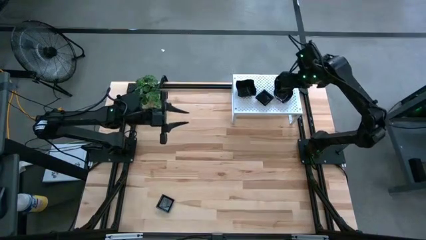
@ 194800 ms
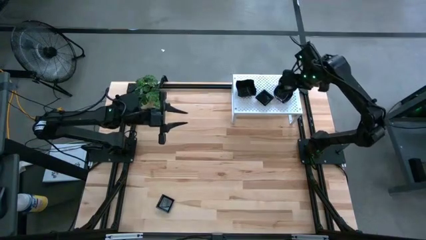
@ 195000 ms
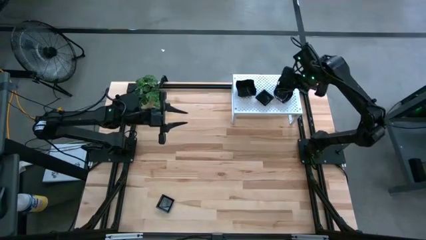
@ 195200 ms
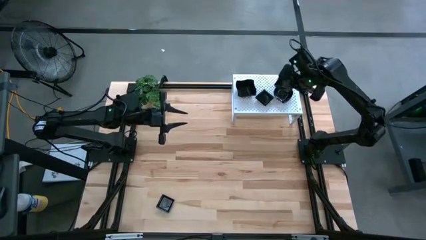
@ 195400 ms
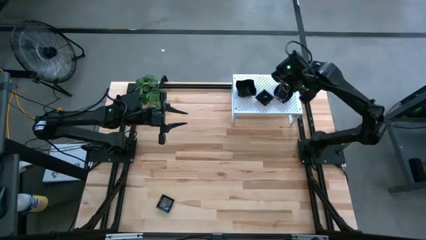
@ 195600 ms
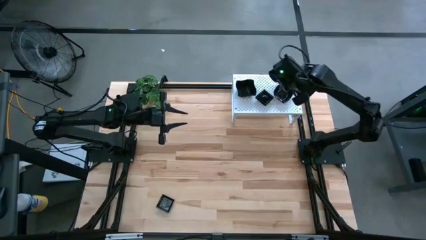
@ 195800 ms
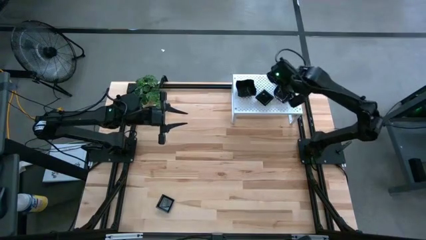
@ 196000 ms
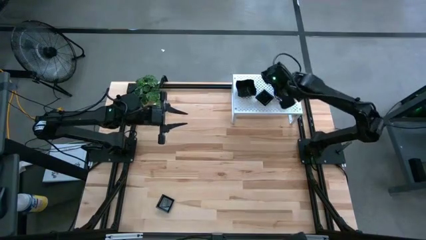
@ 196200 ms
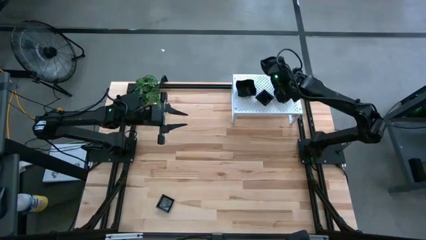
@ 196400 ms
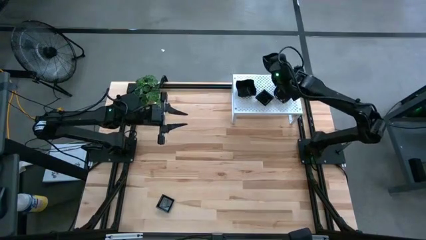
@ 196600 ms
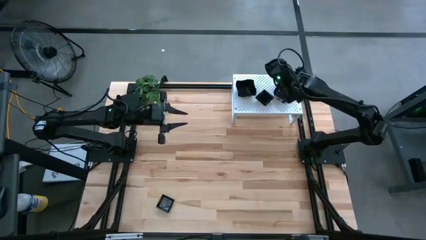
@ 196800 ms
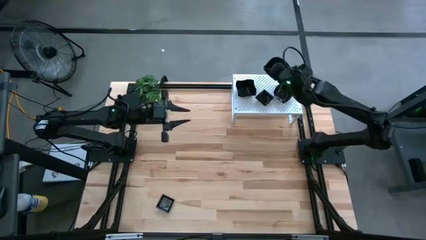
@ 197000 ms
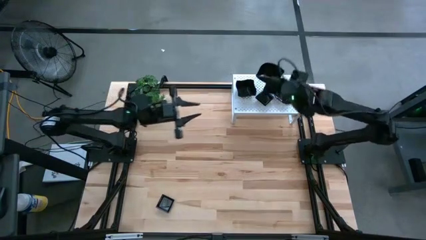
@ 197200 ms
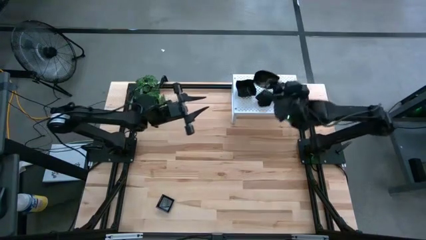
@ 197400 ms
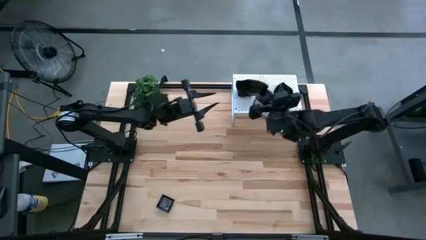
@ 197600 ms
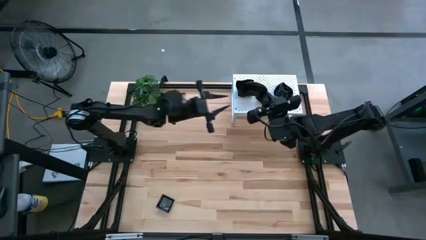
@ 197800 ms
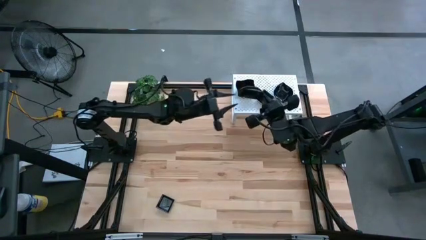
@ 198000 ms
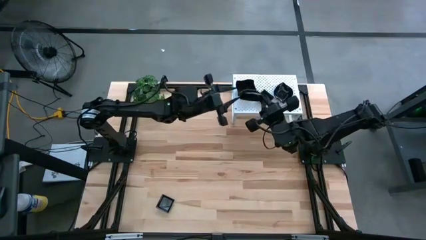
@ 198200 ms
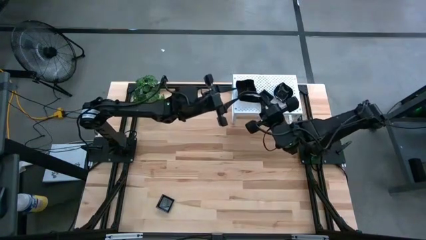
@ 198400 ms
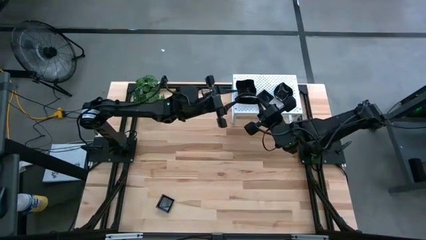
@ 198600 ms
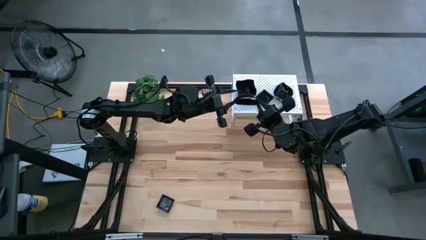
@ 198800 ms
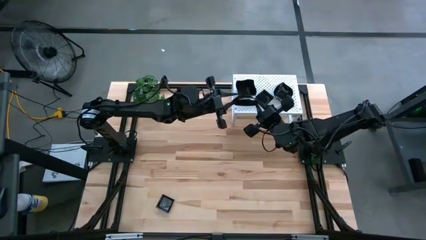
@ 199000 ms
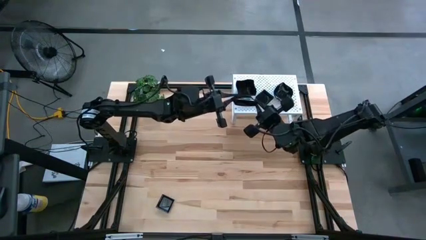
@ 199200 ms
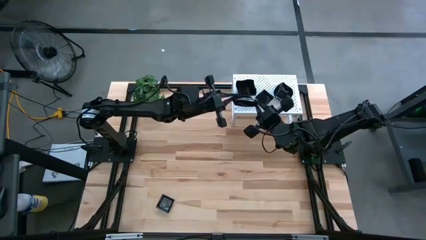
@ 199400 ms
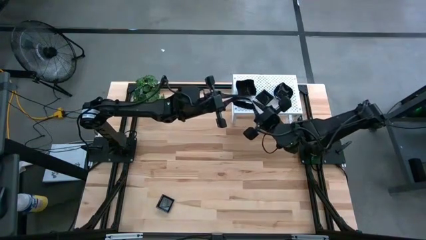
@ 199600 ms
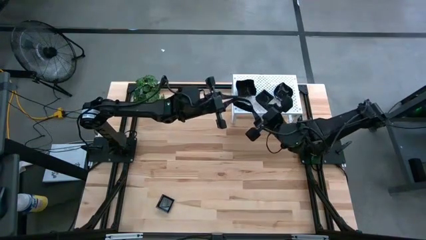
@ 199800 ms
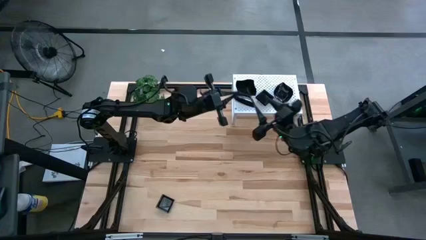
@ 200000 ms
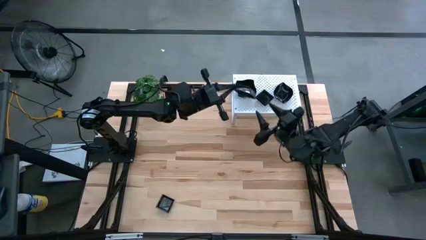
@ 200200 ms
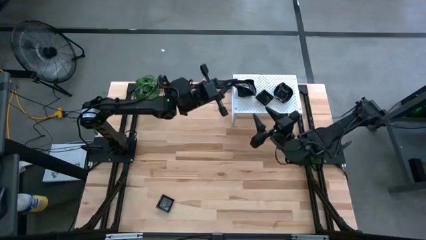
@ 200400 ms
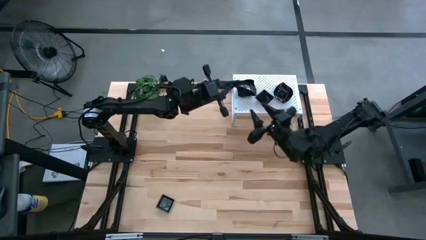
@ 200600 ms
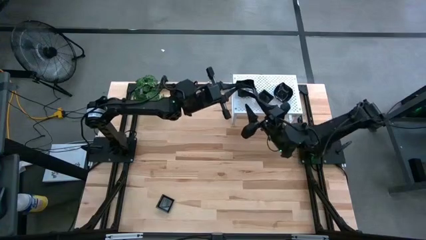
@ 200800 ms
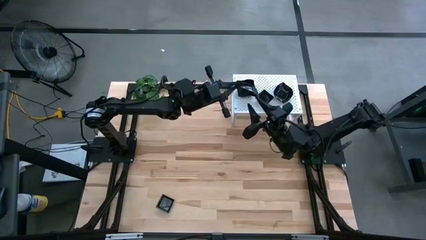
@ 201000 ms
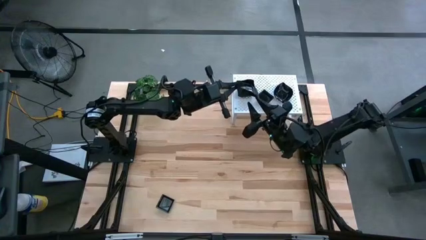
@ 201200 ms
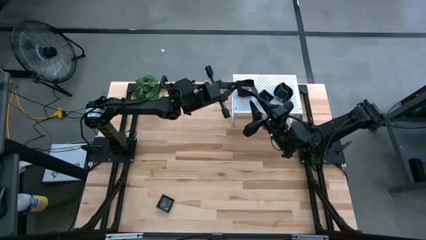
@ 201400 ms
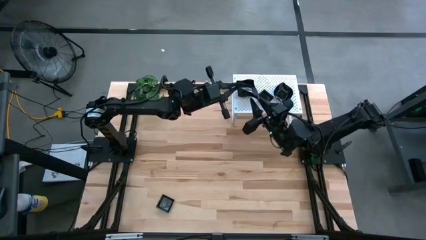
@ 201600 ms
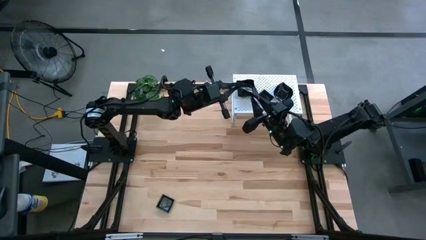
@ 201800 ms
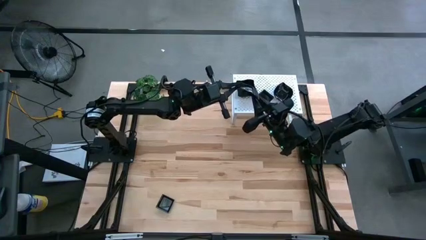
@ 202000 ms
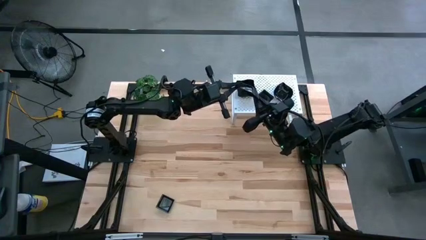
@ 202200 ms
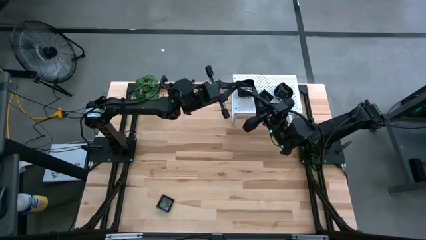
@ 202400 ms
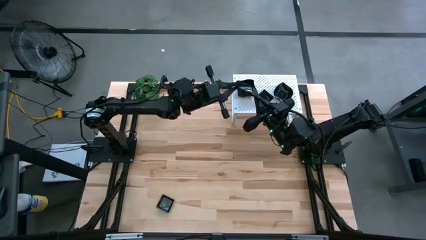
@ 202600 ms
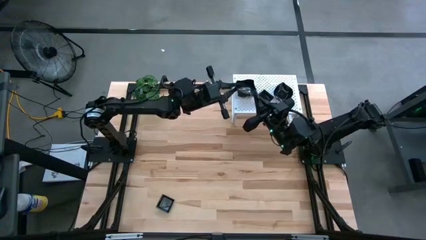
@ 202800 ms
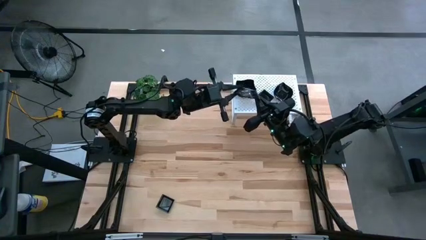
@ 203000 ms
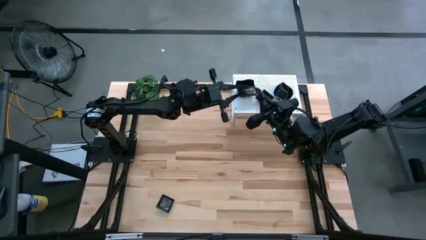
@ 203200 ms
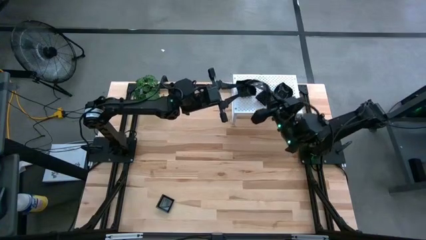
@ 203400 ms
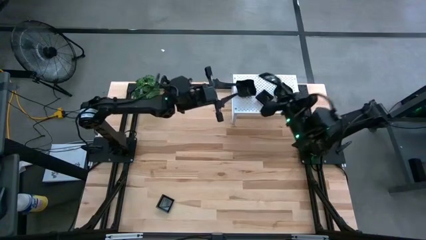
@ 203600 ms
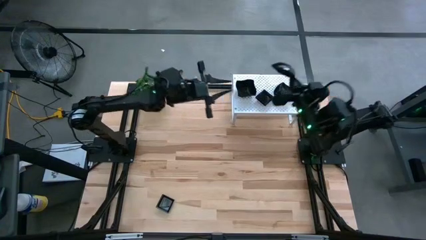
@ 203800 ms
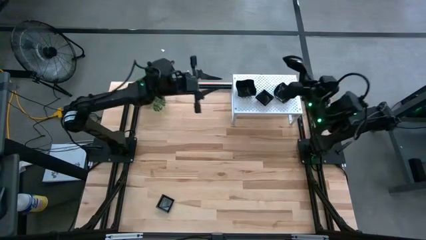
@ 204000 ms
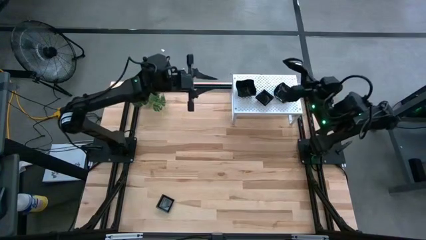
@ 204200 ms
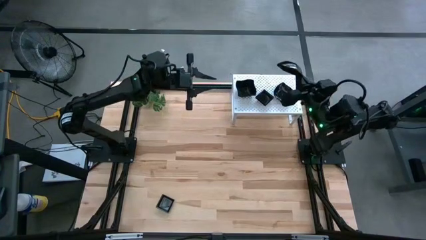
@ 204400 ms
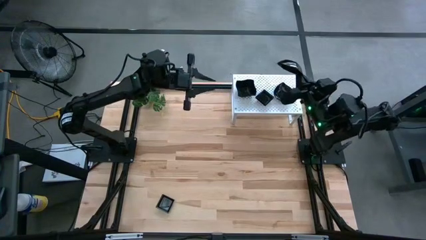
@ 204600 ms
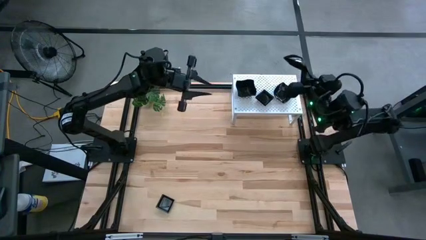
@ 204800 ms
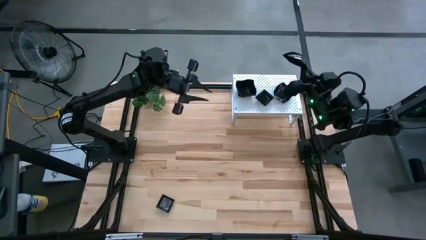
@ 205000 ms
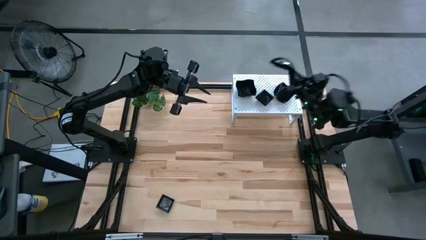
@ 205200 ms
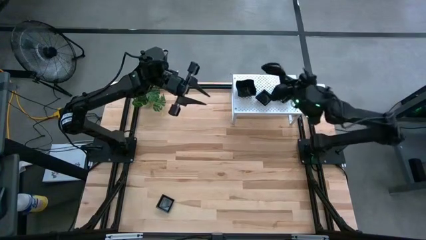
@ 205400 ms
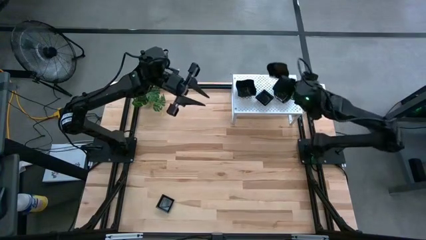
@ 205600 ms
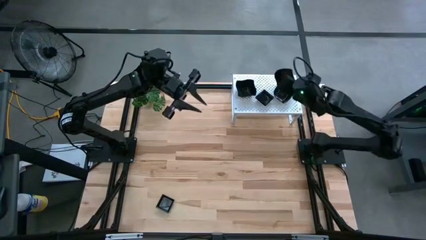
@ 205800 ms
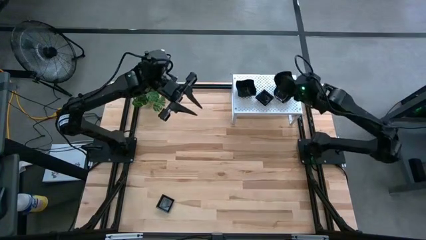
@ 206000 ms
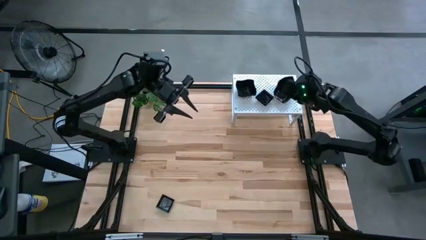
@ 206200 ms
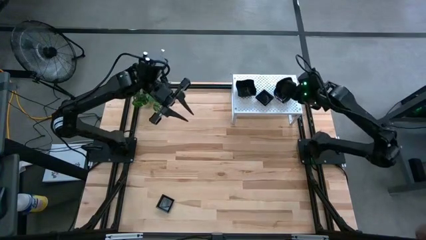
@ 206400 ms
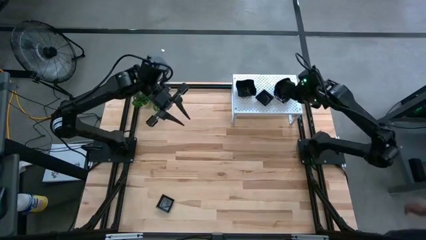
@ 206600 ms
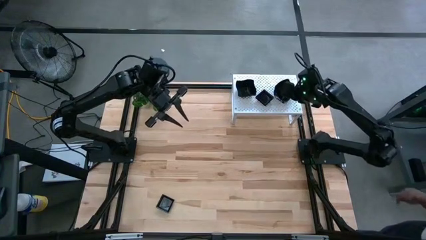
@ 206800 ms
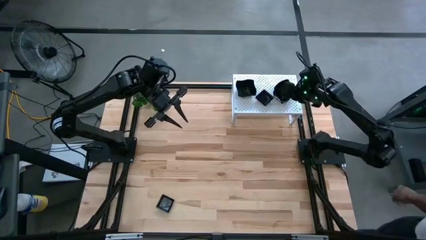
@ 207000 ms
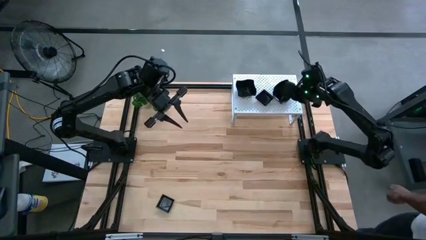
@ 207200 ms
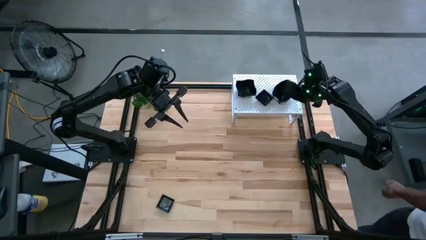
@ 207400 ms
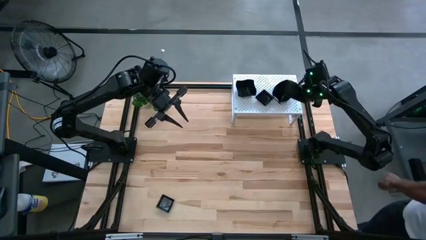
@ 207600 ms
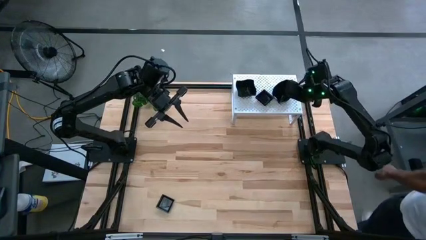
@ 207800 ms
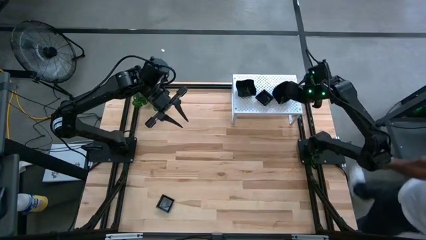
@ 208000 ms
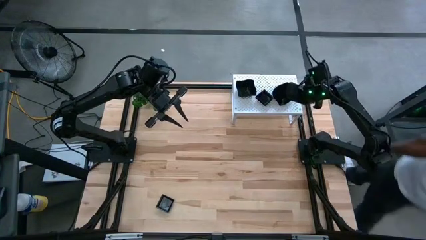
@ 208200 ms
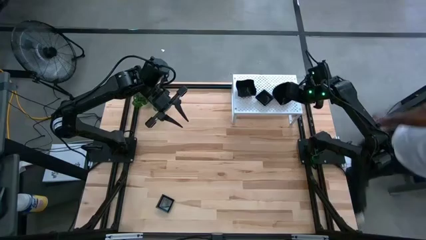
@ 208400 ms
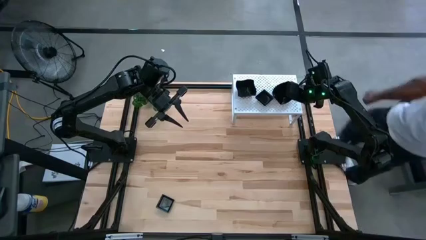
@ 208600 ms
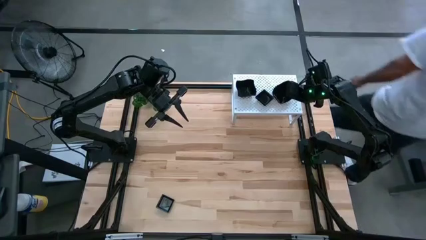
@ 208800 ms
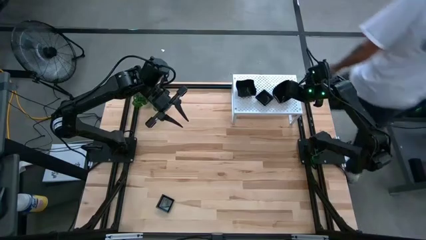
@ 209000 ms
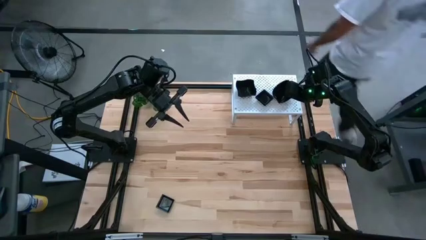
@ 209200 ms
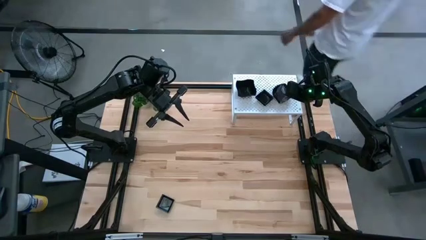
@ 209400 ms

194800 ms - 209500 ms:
Task: Pick & Place Mini shaped plates
Stack the leaf-shaped plate on top of the leaf-shaped plate on the shelf
